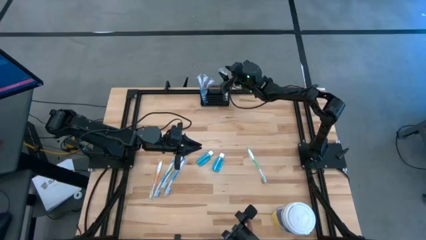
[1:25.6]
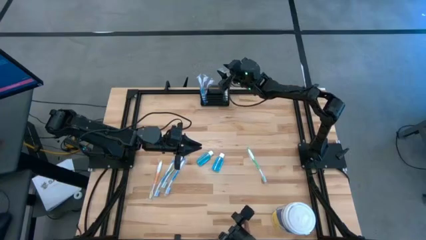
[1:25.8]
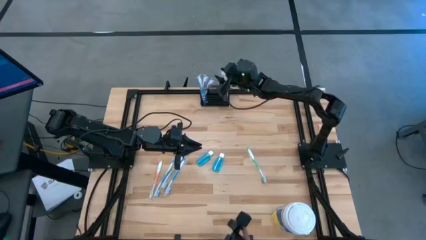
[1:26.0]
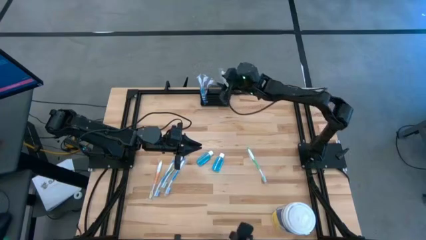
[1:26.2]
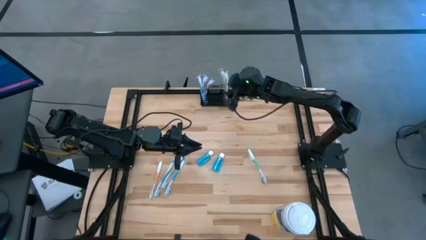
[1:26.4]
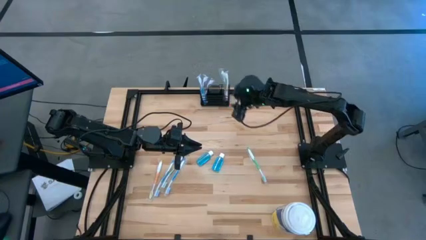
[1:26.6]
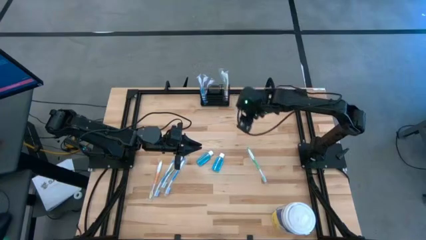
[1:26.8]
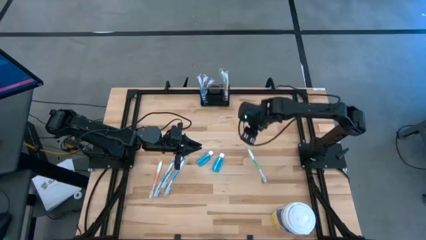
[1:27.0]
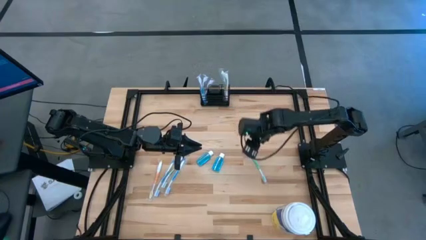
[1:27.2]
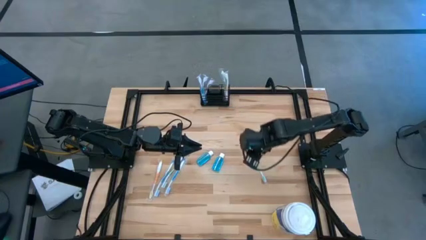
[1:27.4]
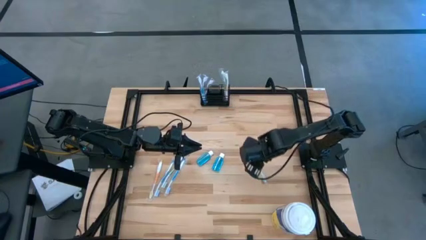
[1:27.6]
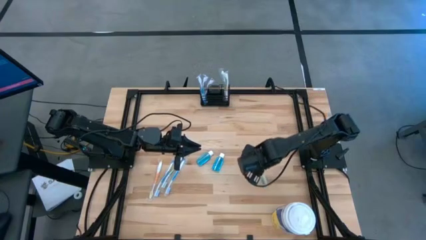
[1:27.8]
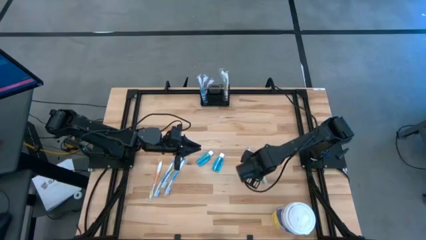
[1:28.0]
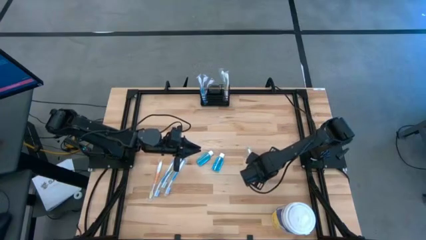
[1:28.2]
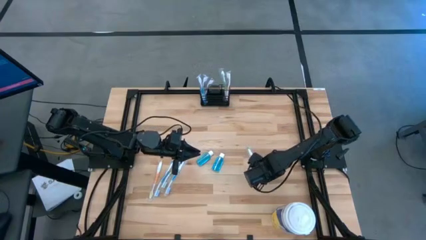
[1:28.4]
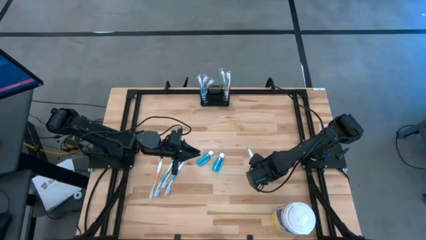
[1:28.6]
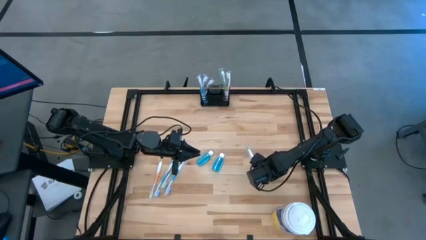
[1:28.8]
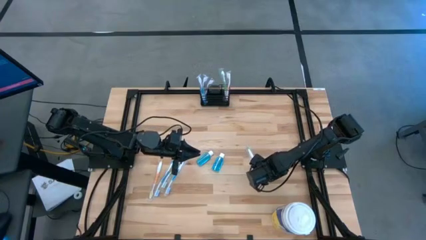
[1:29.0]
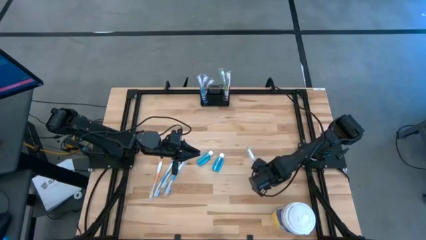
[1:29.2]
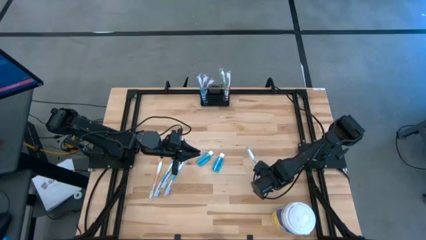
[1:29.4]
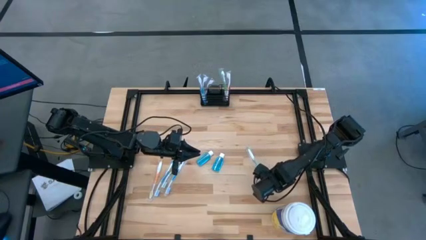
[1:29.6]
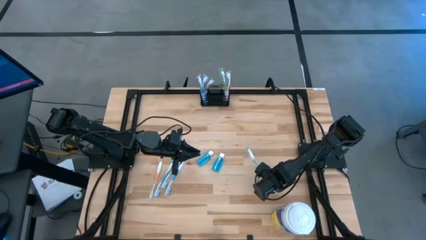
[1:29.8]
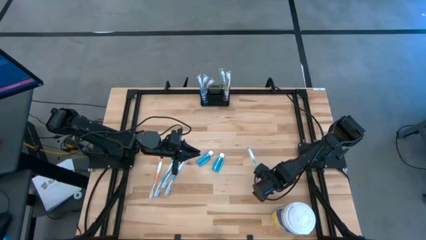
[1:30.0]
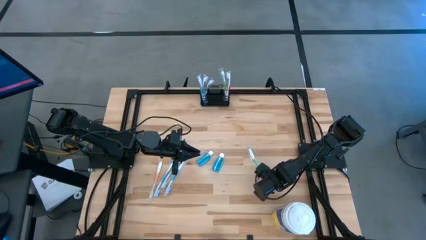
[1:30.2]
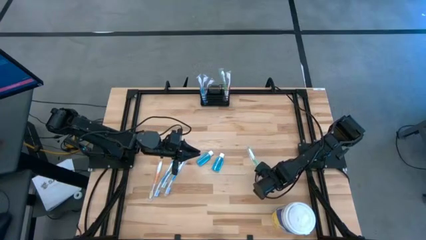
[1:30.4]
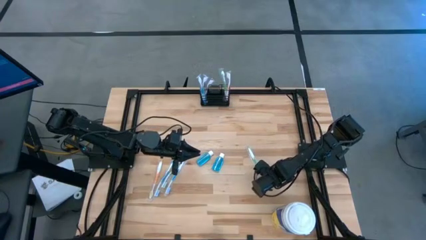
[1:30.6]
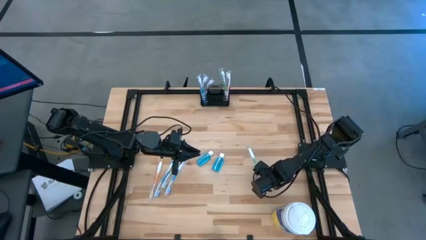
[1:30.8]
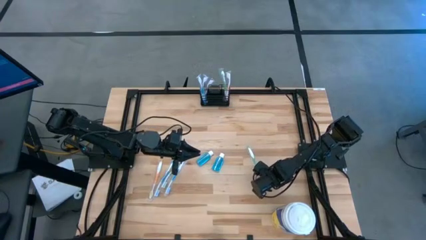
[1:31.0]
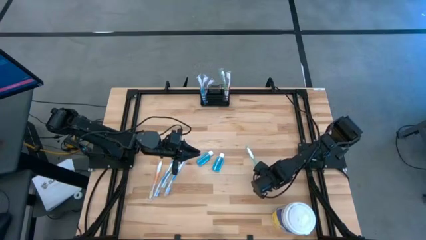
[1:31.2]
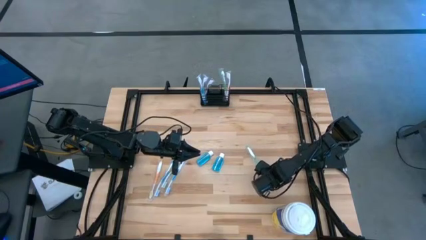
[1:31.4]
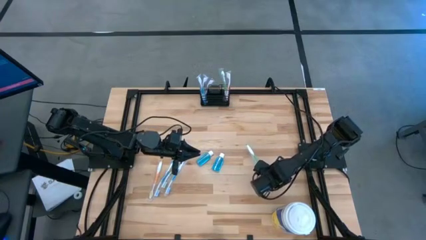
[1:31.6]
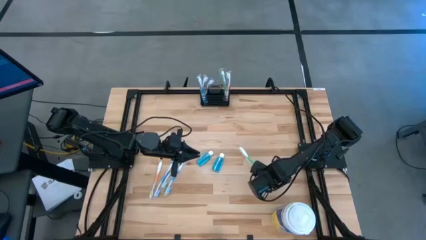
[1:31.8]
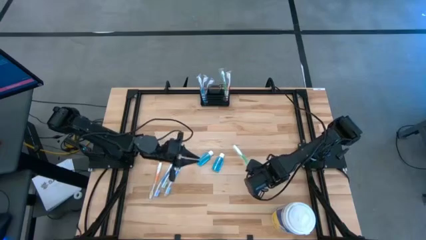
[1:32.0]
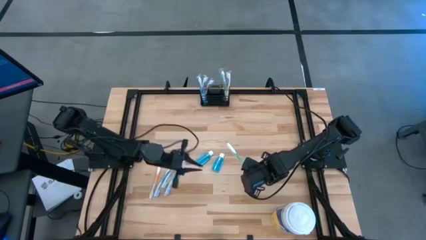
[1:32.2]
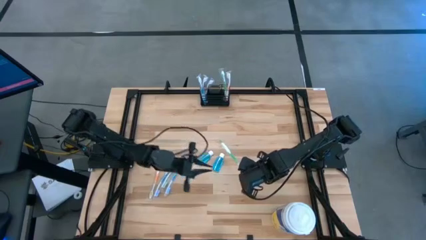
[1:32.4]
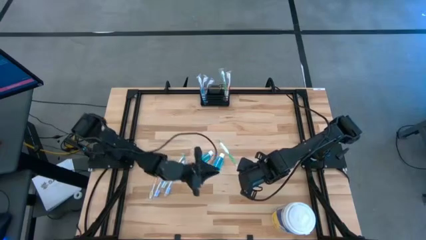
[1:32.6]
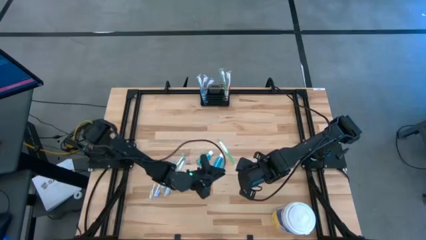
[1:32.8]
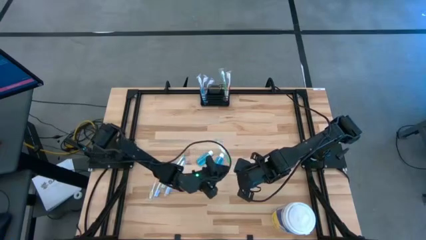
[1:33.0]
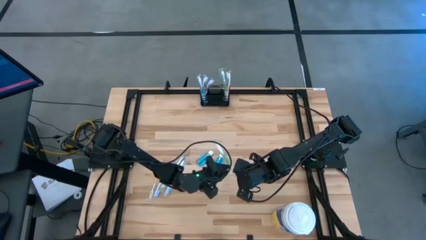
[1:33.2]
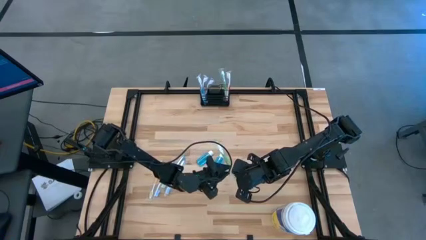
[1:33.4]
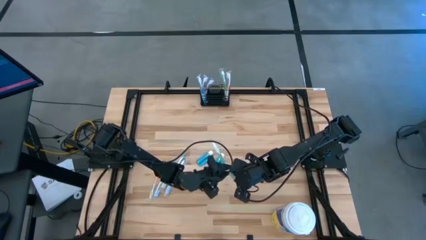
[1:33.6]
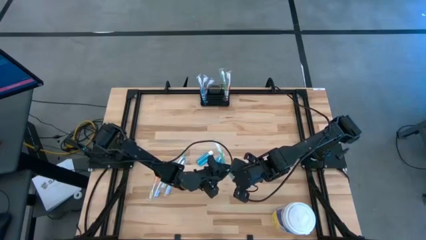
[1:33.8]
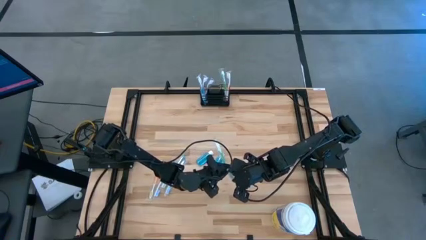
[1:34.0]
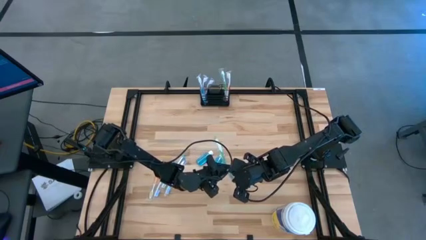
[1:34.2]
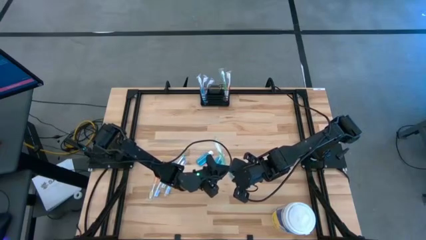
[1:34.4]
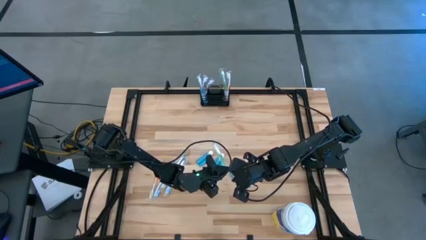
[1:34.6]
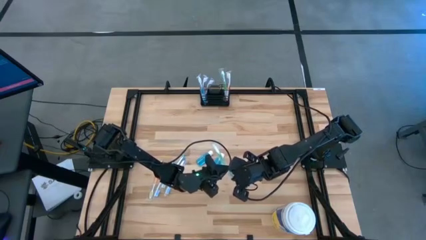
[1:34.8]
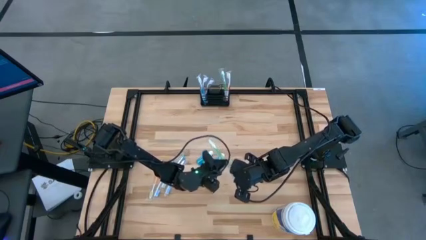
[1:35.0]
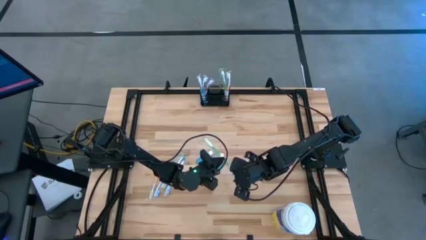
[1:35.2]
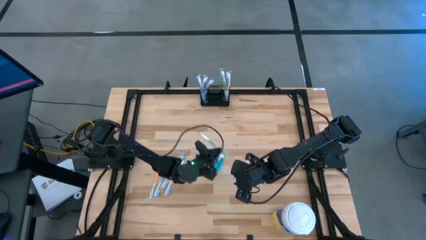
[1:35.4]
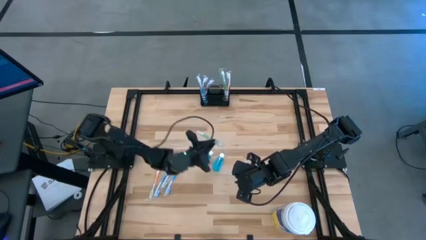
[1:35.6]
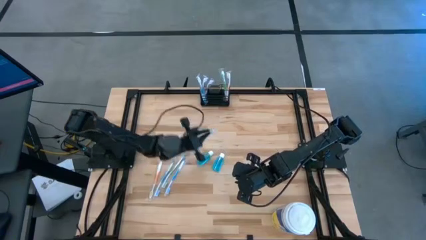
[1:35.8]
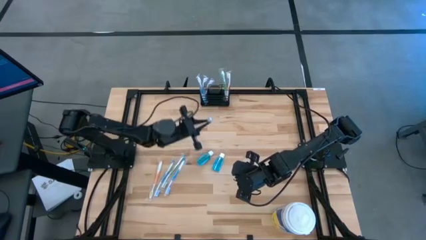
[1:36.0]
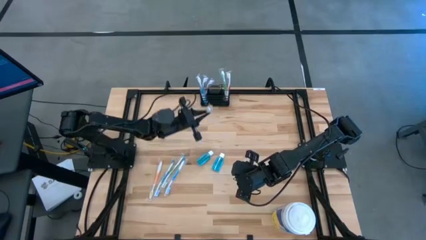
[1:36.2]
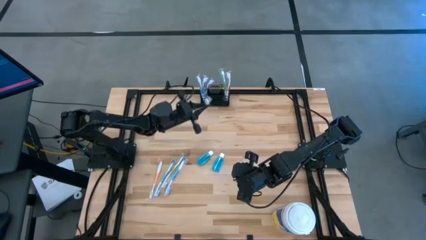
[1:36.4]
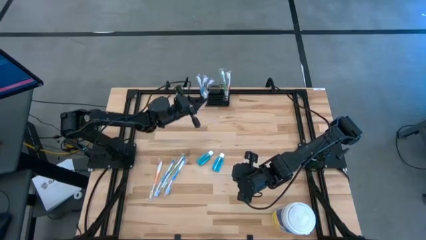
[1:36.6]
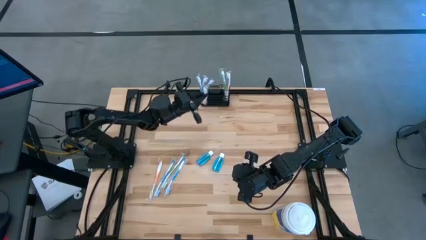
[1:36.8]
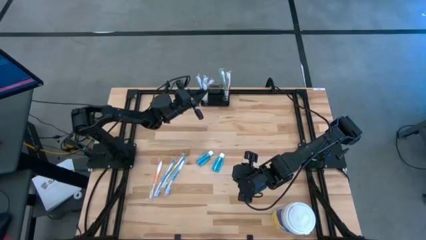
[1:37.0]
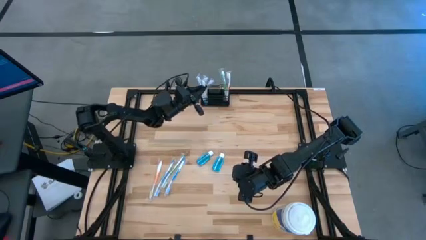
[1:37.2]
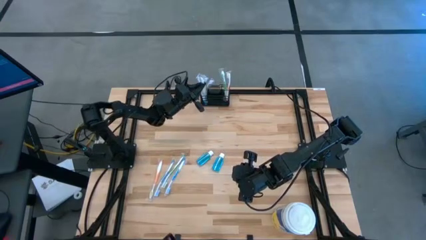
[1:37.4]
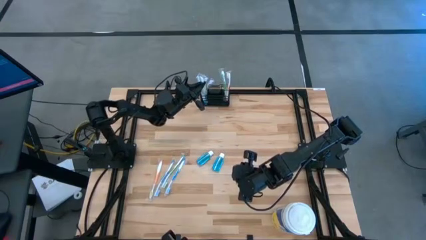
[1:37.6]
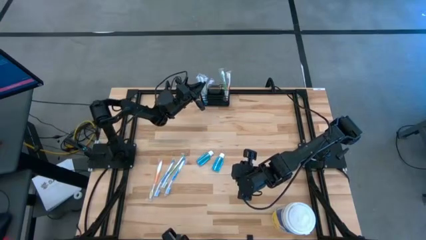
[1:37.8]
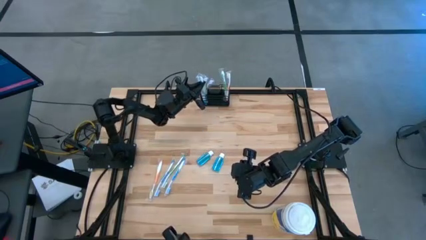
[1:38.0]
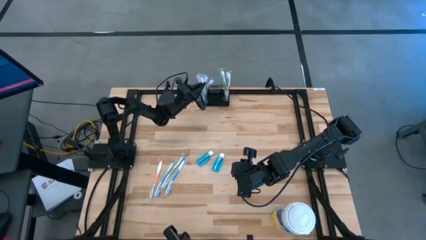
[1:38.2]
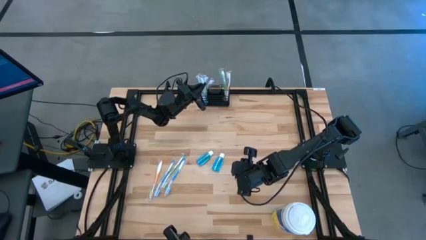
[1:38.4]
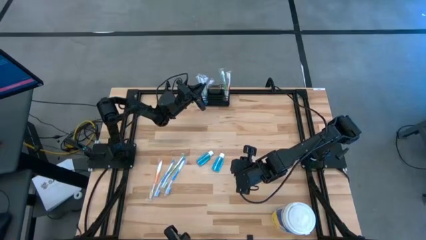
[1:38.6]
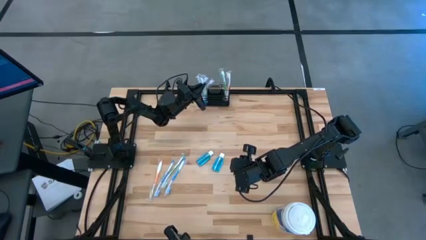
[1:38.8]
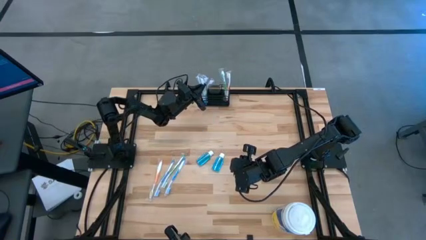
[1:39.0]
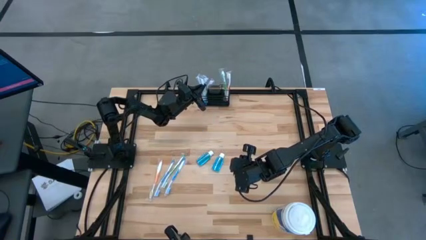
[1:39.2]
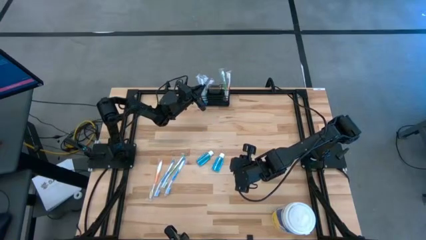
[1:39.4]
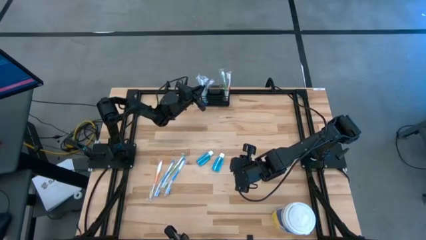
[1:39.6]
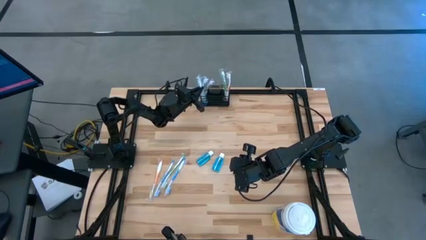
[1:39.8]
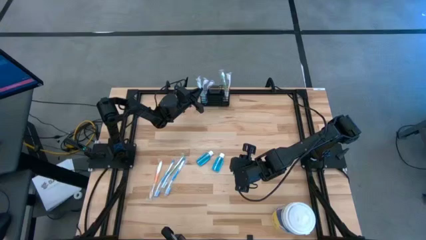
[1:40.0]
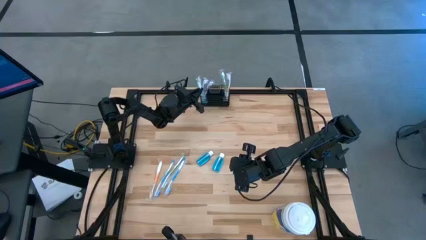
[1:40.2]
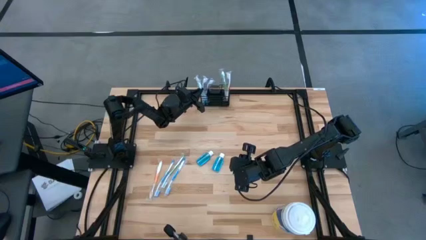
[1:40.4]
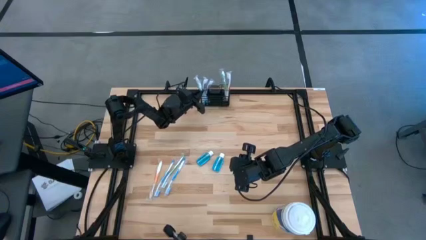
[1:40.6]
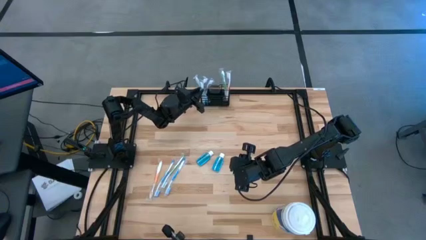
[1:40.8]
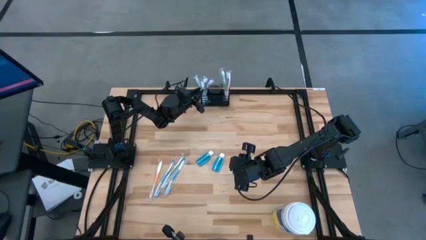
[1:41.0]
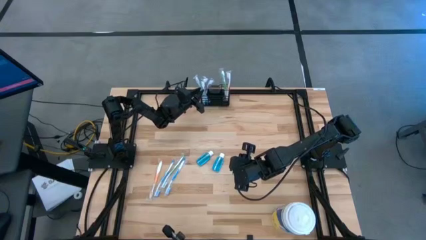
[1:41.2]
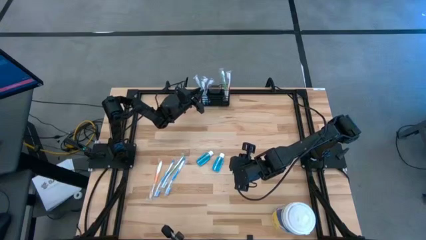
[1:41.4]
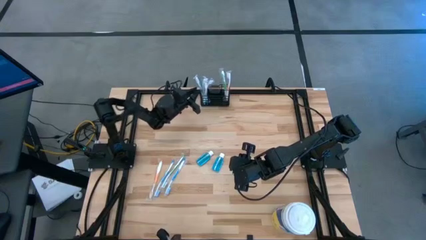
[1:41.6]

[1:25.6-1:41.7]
Task: Pick & Place toothbrushing station
Put the right green toothbrush into the black wire organizer
